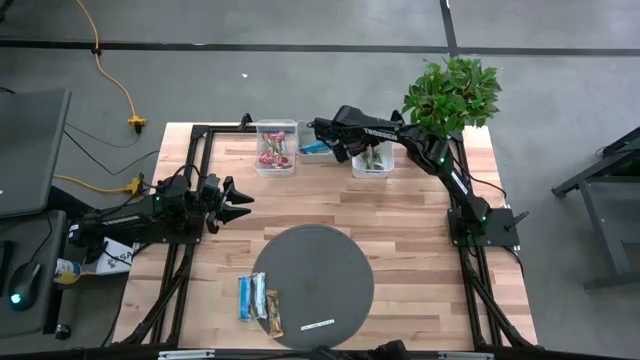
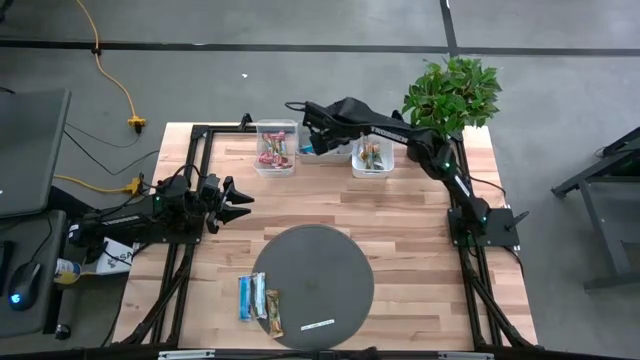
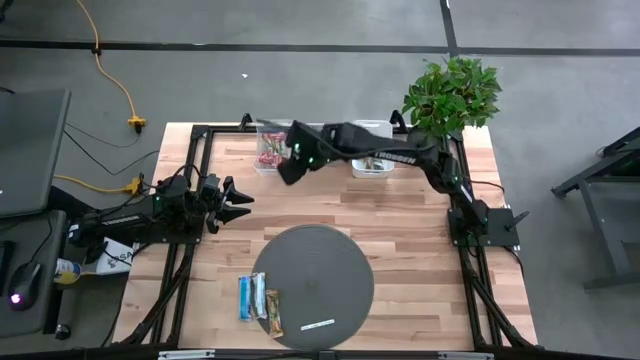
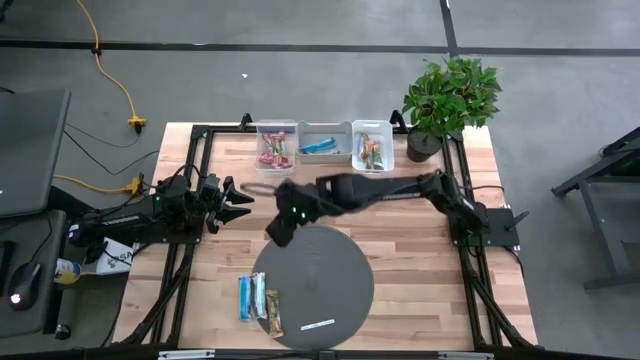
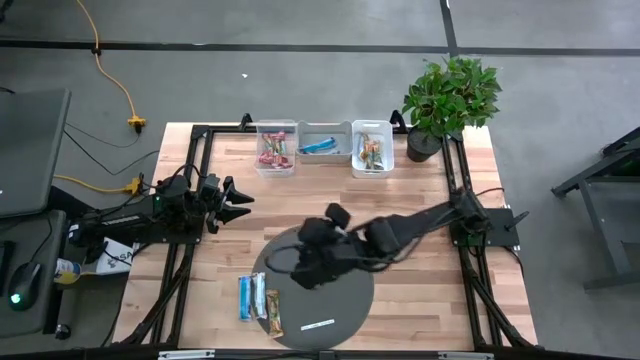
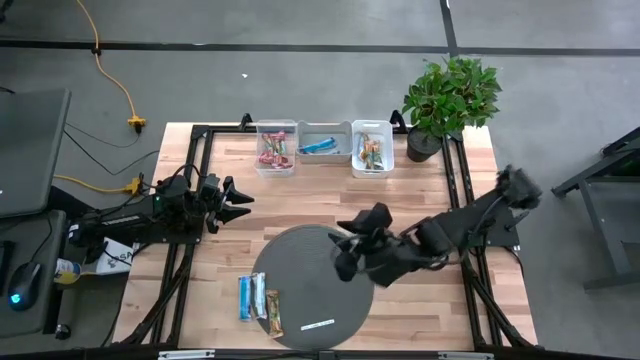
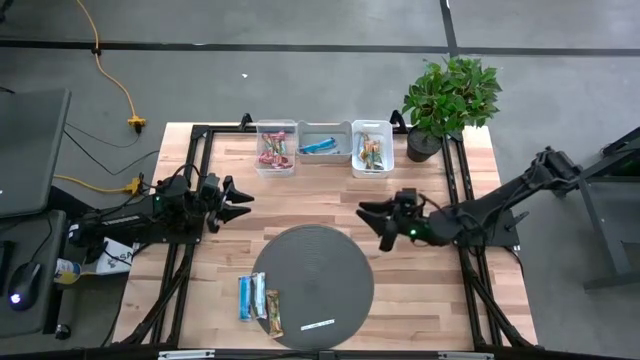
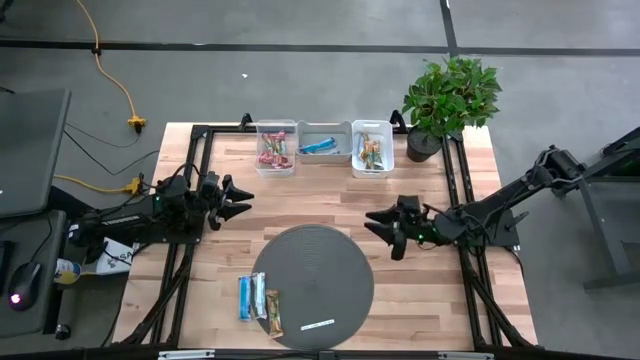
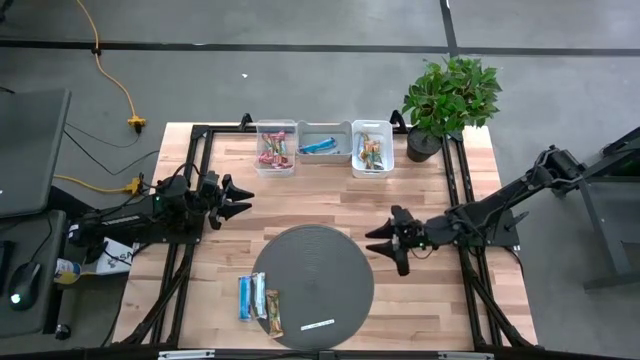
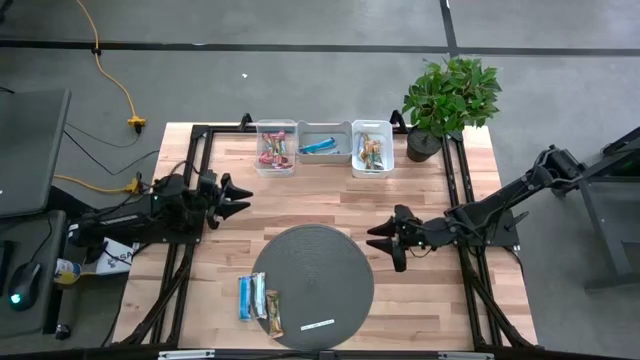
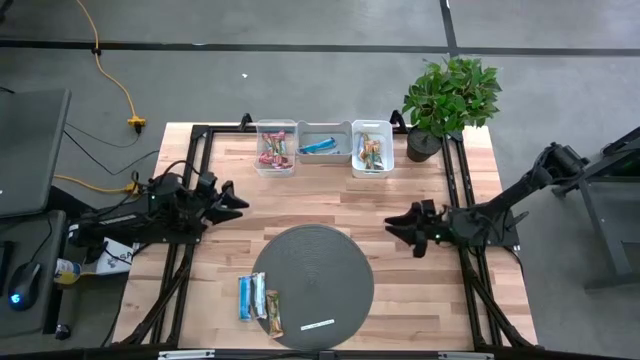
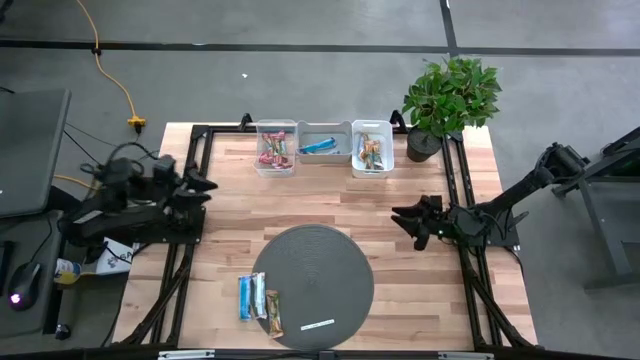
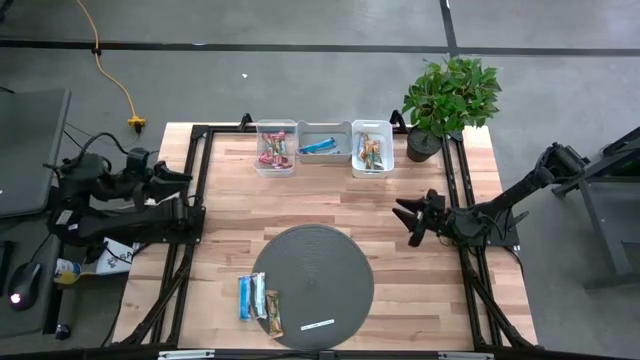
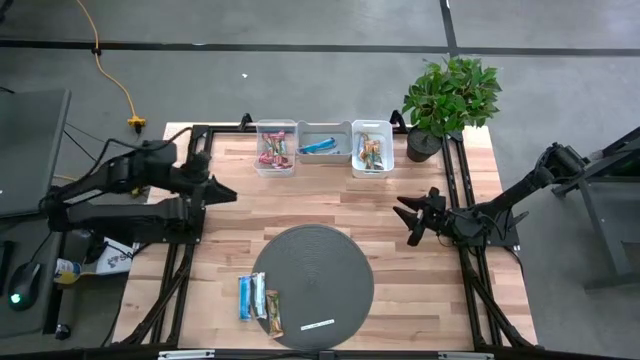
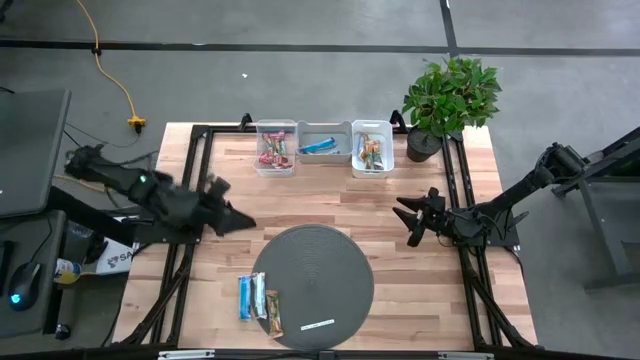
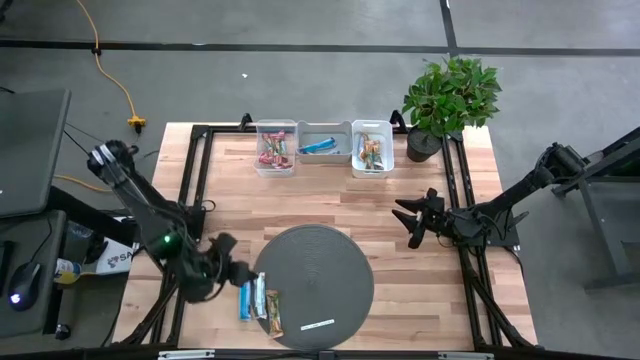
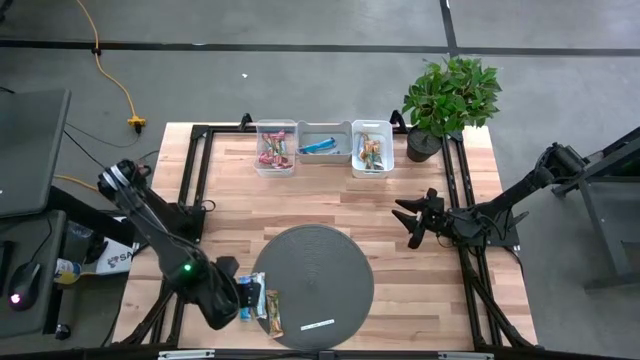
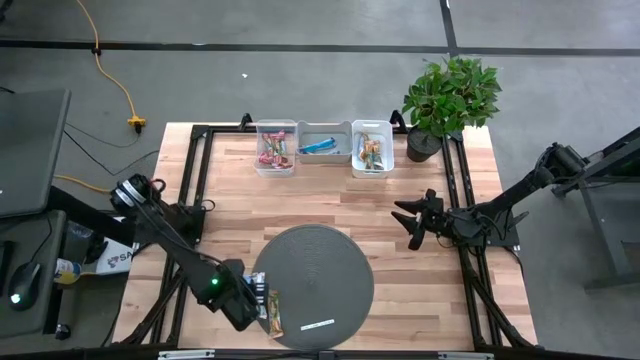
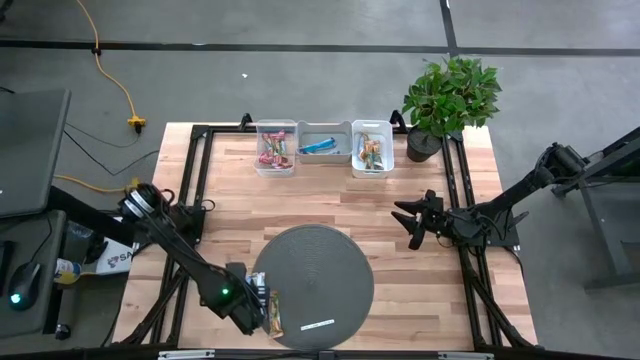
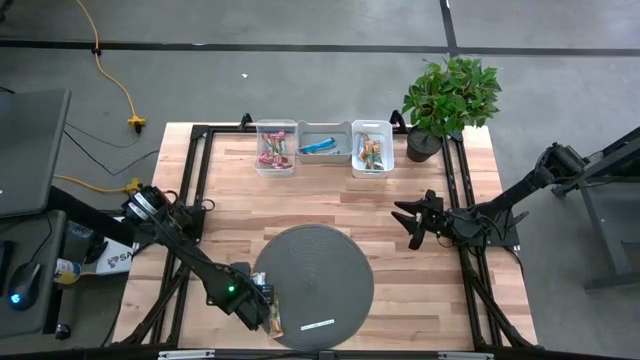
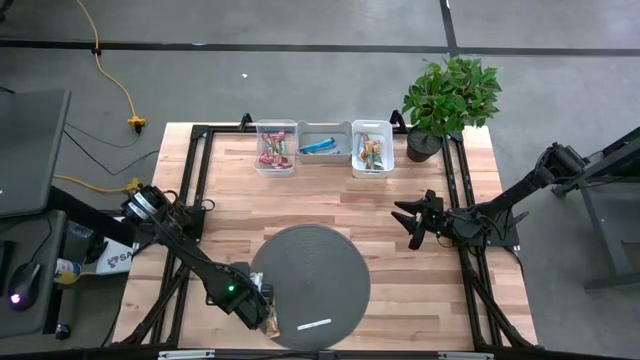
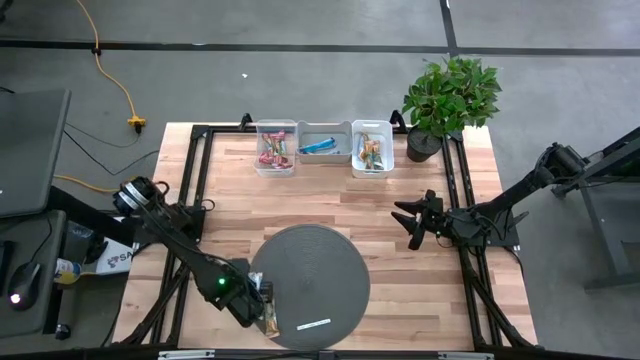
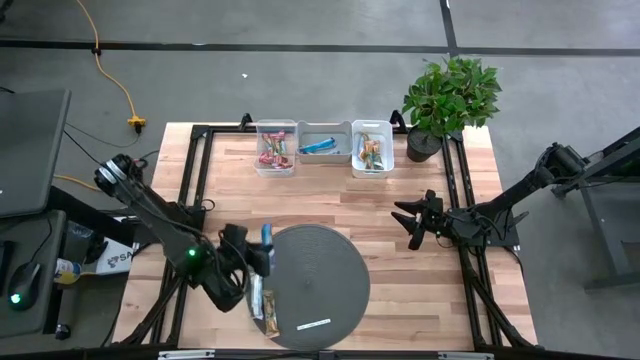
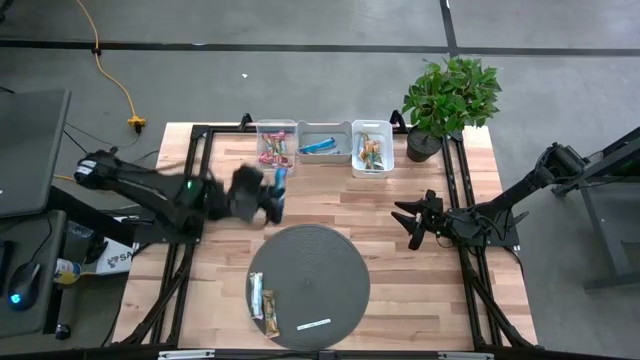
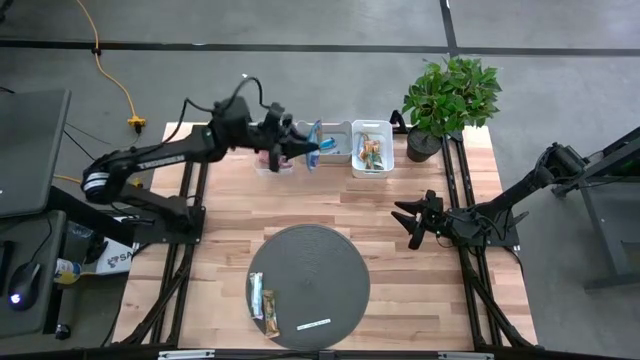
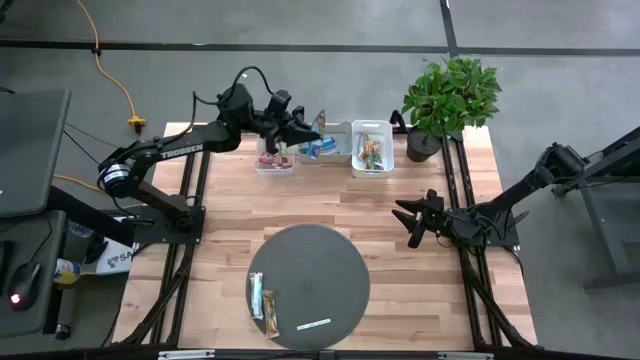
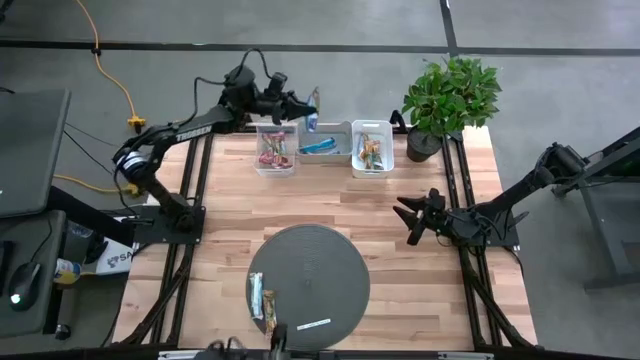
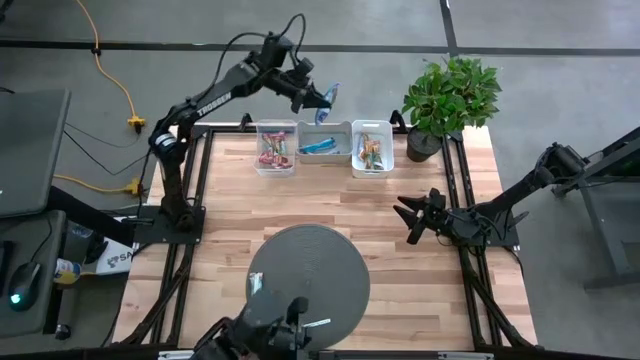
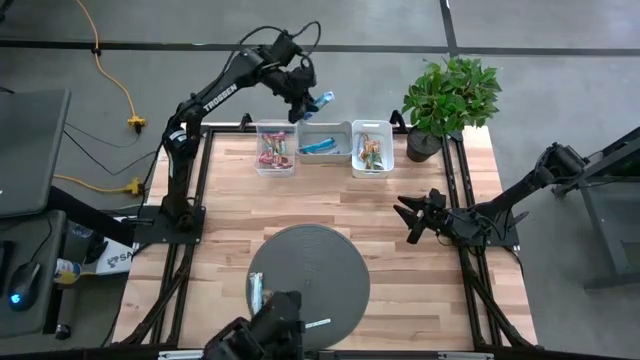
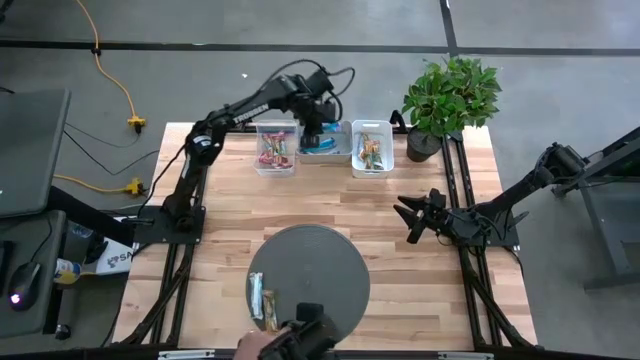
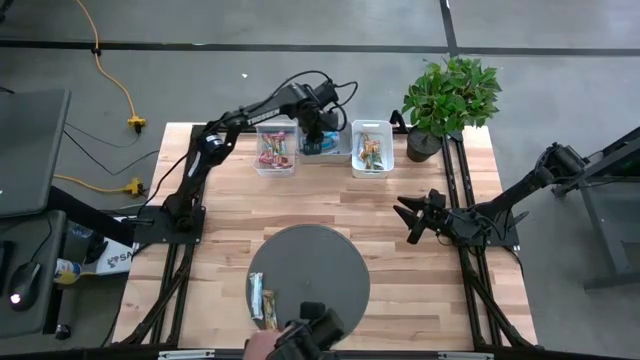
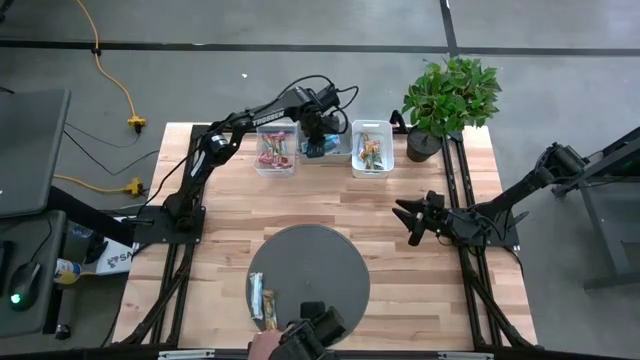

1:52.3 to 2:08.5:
Task: Pick and place Granola Bars by type
Put the blue granola bar into the gray bin

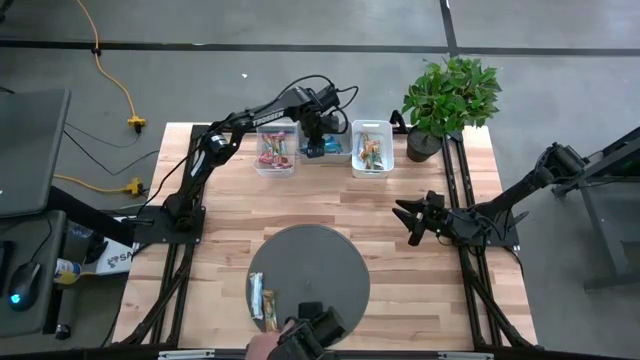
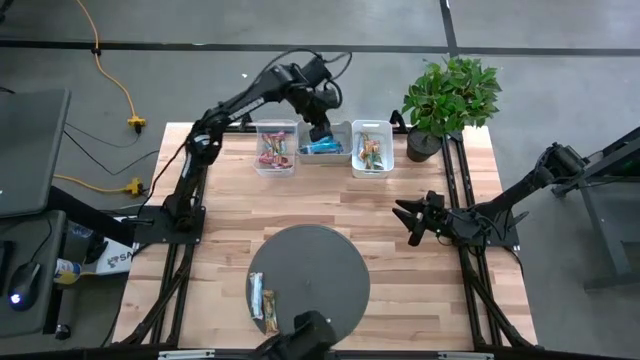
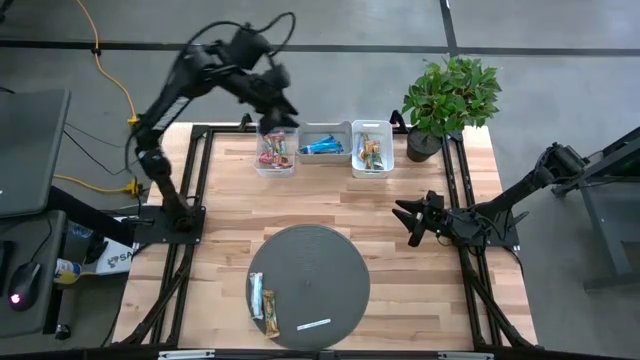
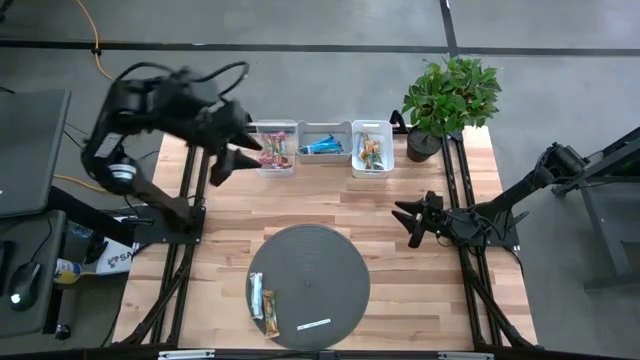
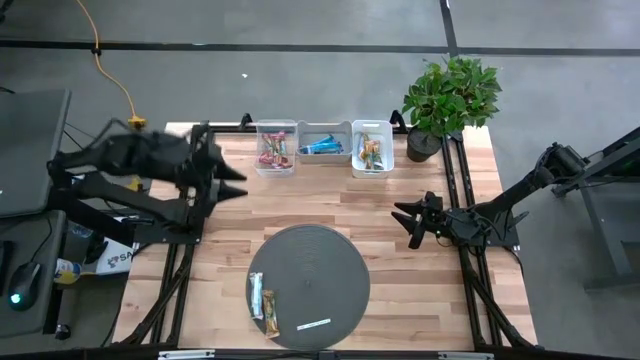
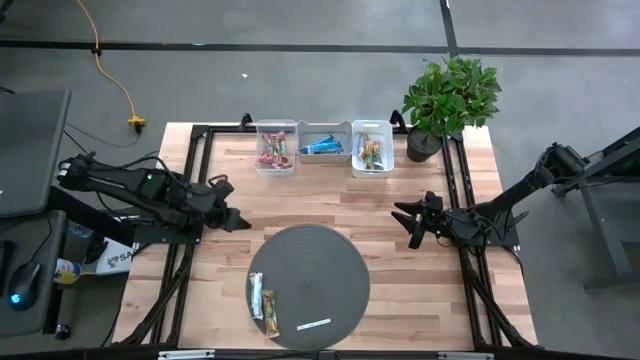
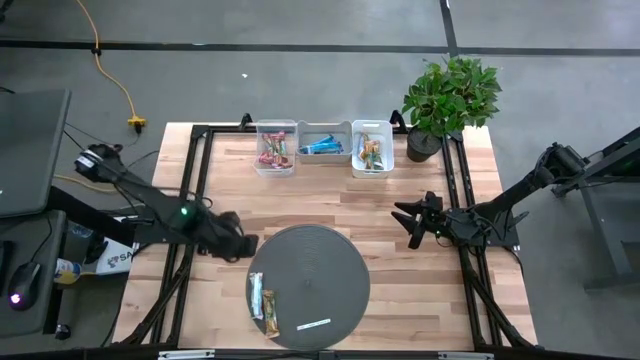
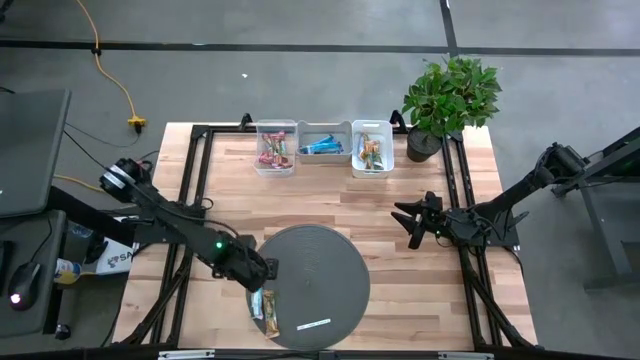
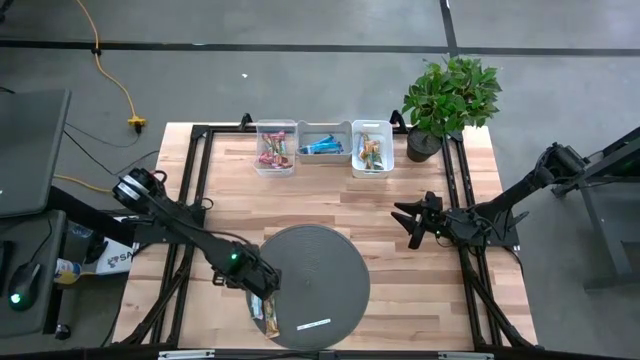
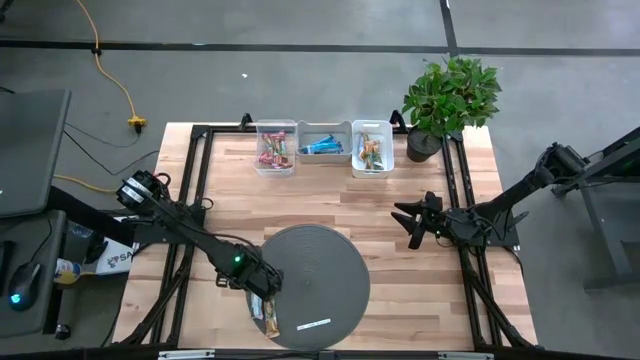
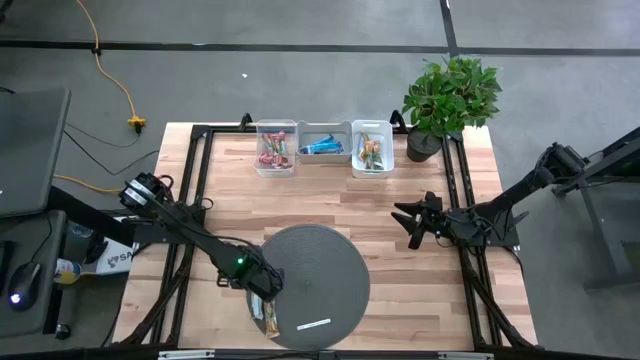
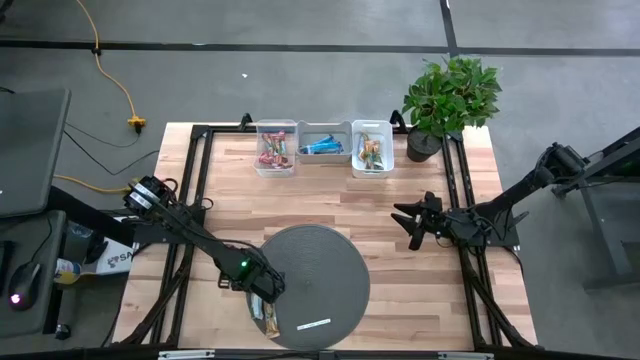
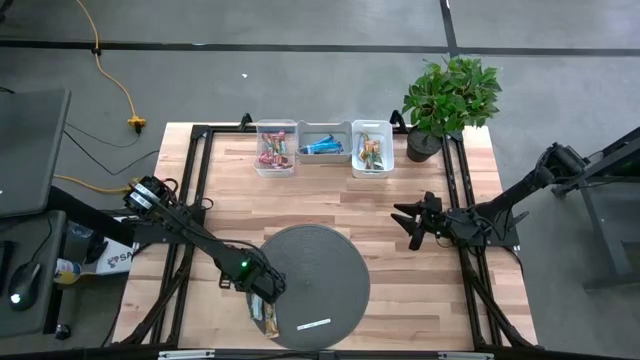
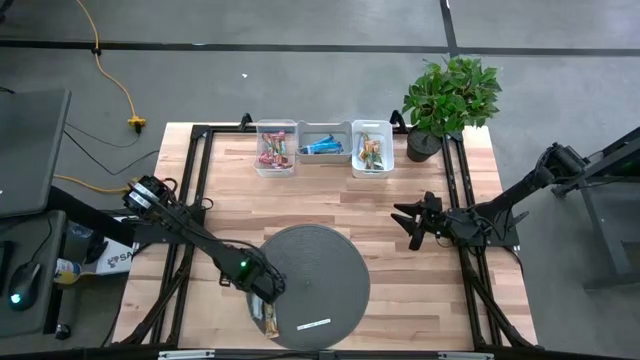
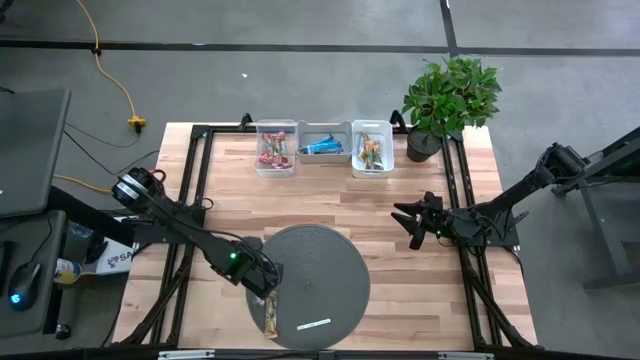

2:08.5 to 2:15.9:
Put the orange granola bar into the white bin
